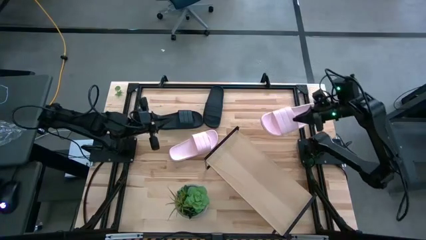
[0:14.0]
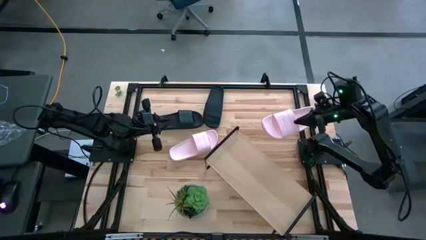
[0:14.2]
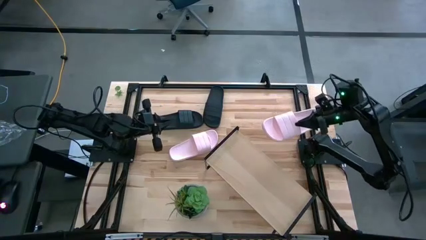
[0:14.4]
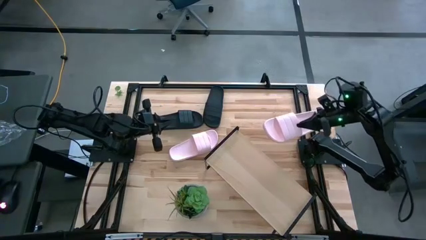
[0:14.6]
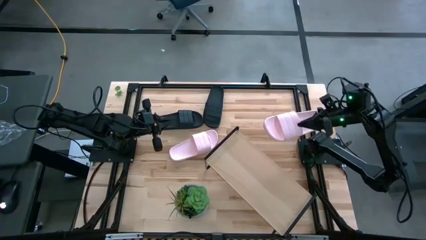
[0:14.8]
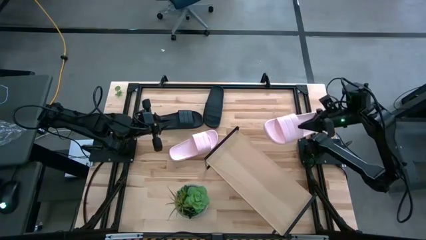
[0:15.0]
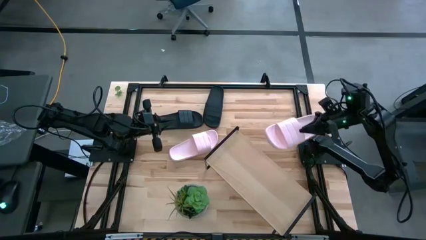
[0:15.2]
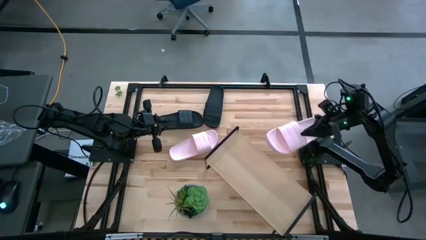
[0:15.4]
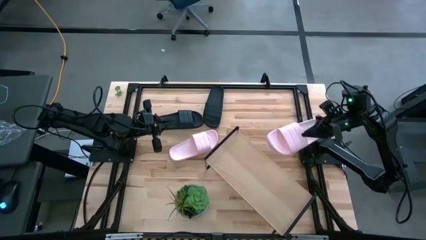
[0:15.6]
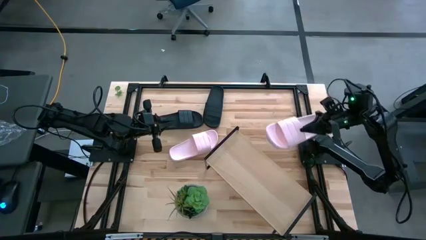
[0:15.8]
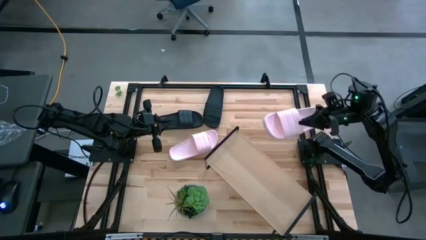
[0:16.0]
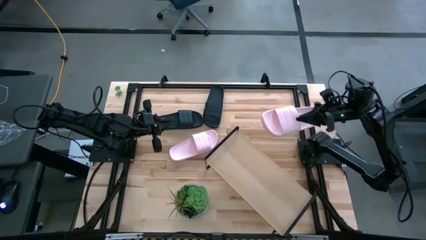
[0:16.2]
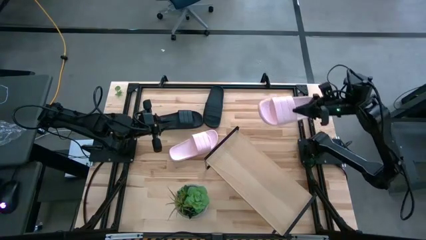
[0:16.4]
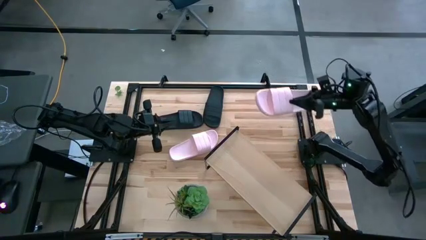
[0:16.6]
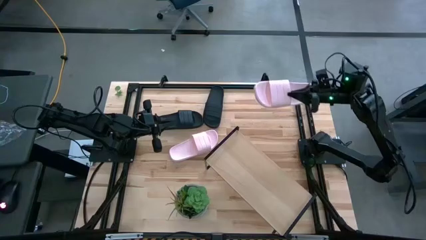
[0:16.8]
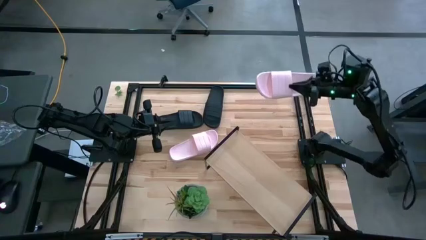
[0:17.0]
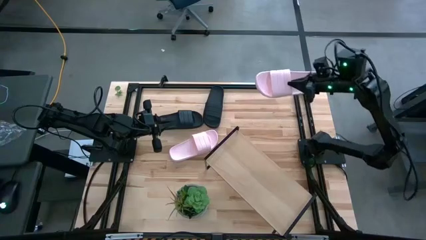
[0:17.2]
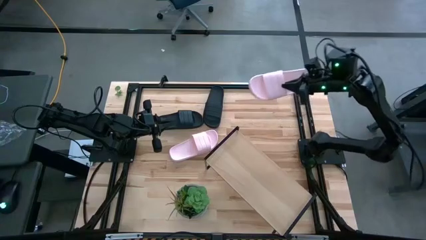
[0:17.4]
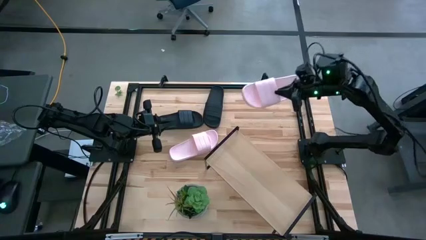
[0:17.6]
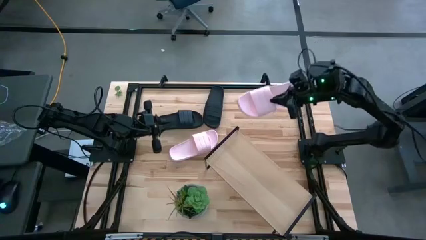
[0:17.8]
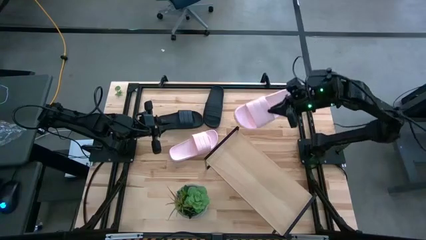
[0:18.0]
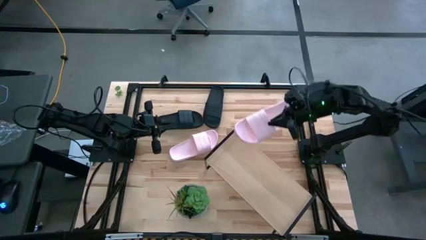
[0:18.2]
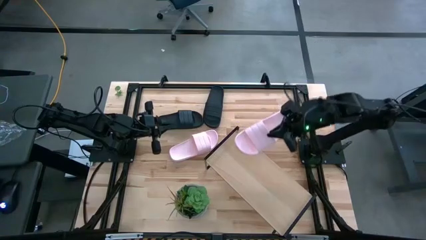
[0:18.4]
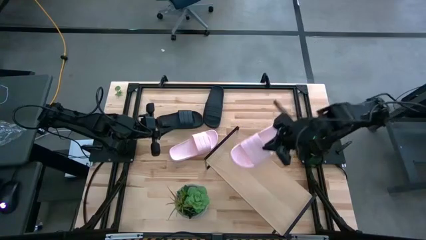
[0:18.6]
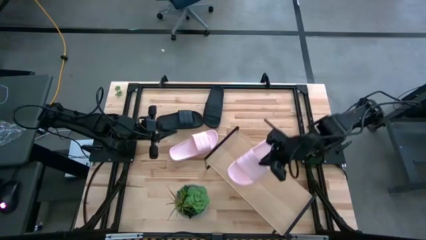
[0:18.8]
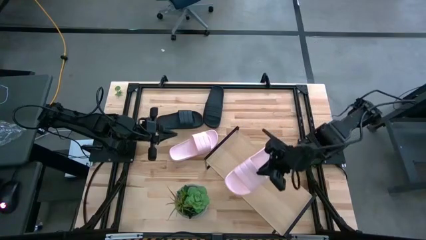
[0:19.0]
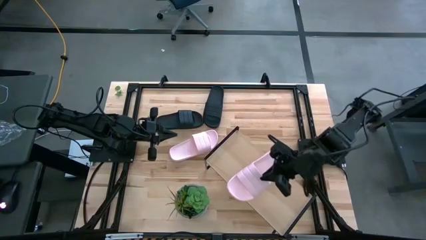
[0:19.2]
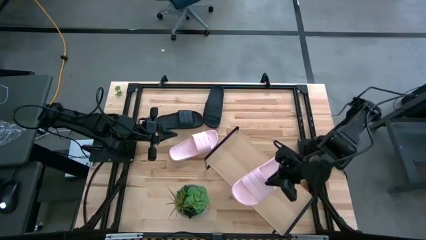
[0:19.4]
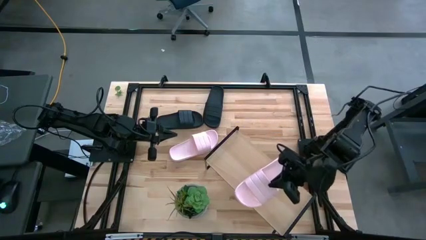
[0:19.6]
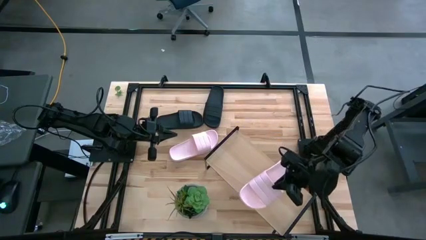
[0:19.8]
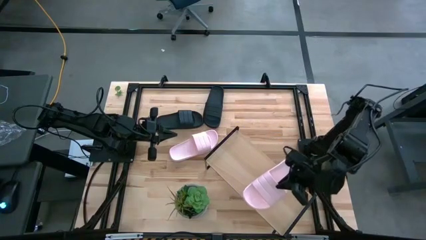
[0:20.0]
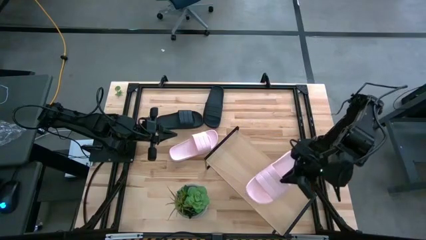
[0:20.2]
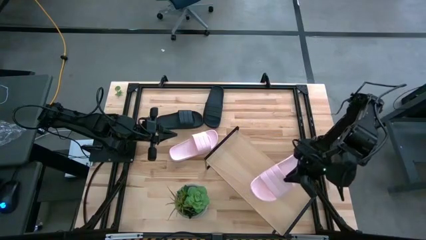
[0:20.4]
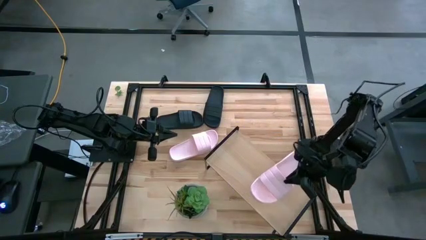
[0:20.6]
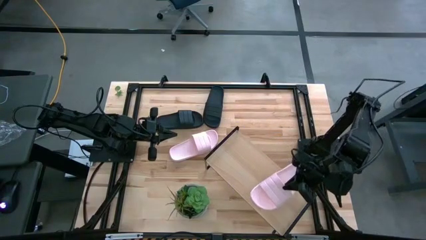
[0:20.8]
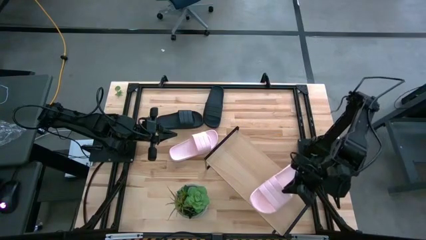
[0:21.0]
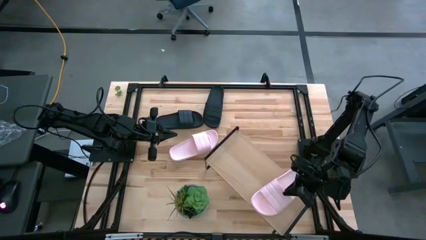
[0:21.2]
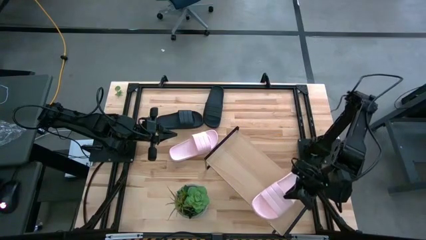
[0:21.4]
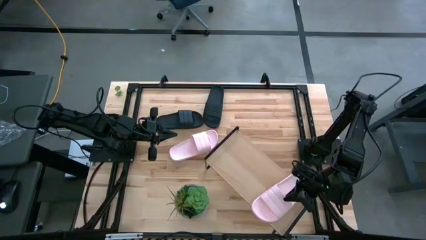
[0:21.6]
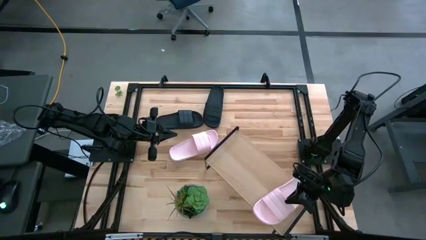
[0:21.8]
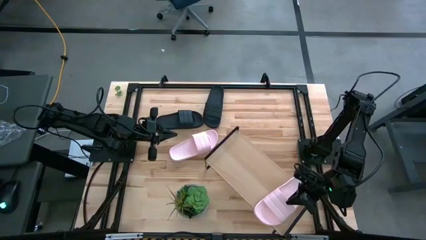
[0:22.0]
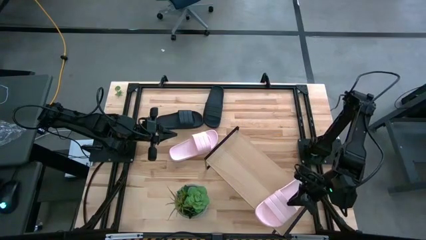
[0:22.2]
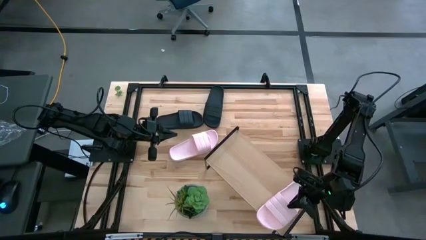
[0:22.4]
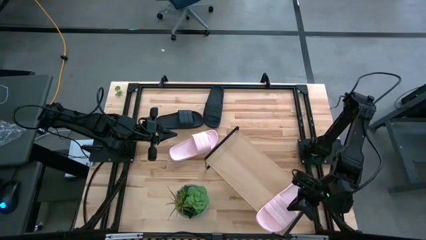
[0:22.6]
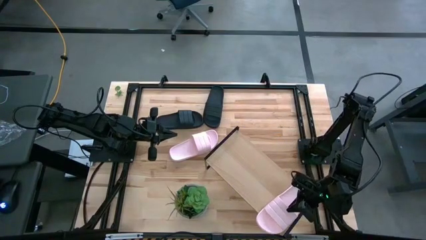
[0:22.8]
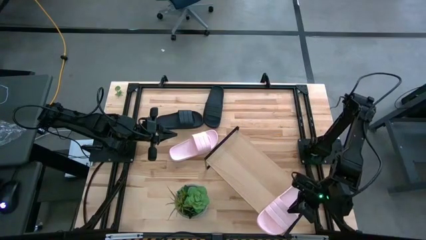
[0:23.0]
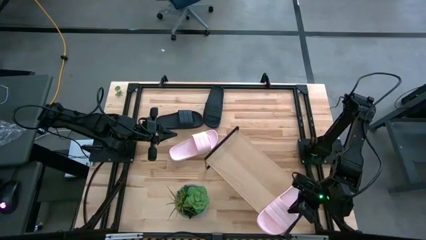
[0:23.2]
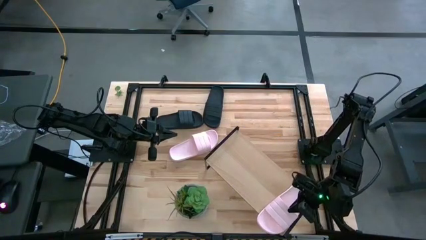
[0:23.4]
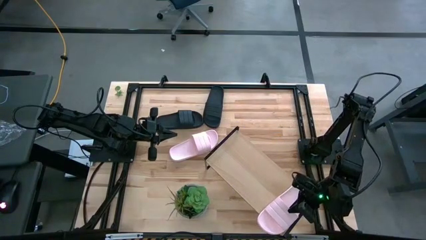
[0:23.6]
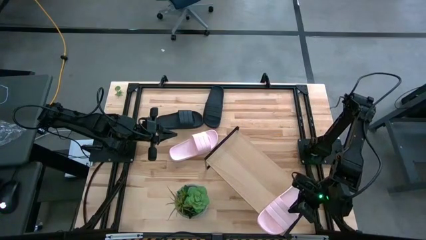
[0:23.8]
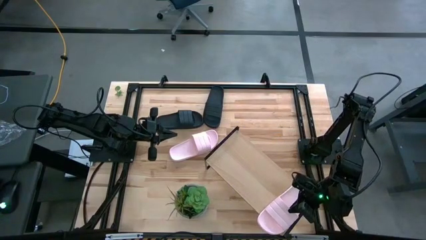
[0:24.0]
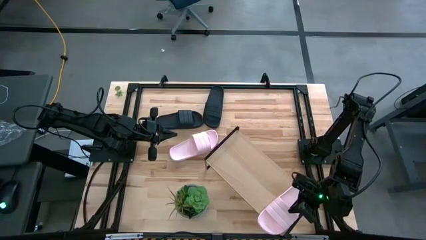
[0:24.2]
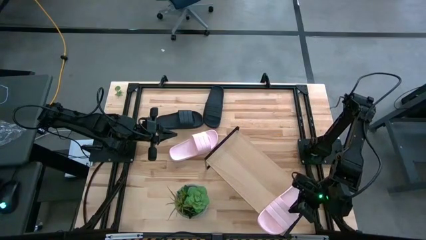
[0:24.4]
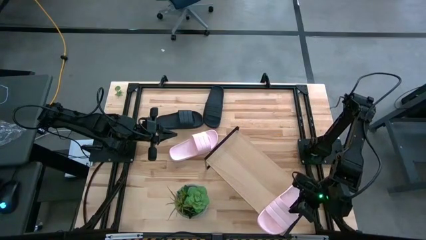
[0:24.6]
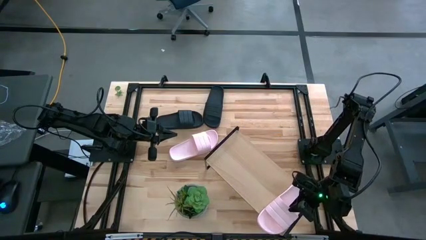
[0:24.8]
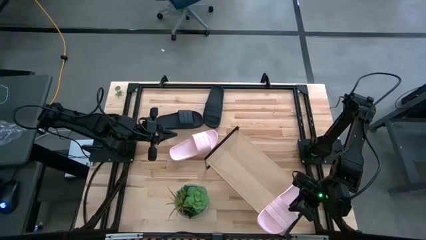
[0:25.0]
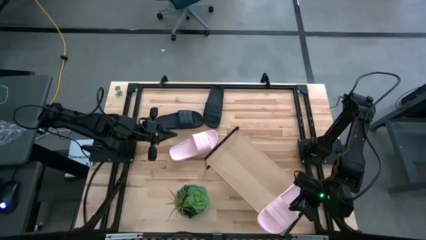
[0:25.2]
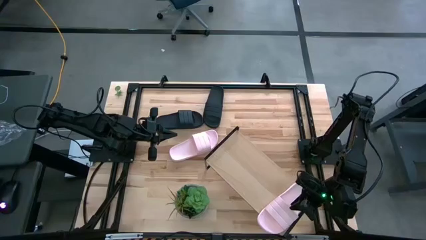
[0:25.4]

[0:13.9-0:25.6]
Task: Pick and place slides into the shelf
Put the right pink slides on the shelf
